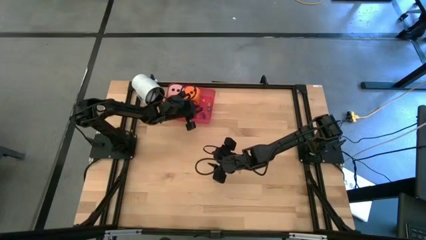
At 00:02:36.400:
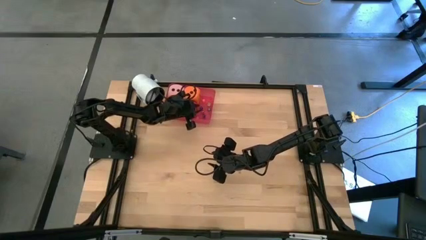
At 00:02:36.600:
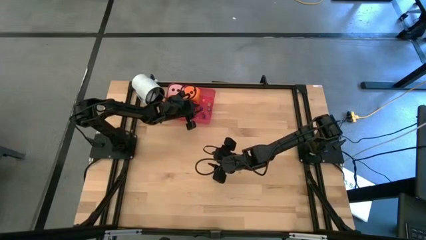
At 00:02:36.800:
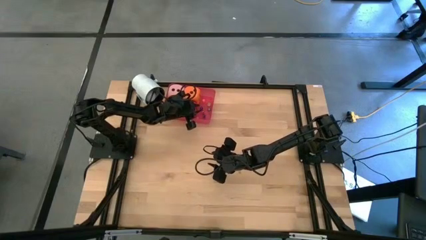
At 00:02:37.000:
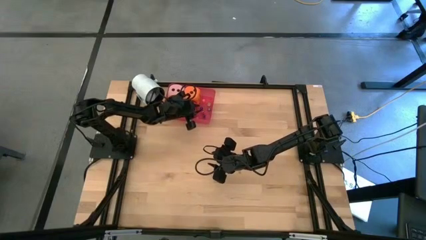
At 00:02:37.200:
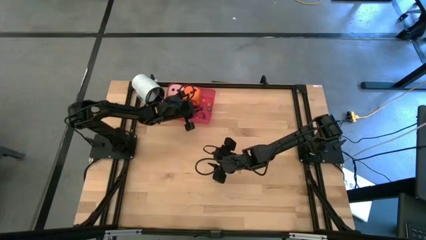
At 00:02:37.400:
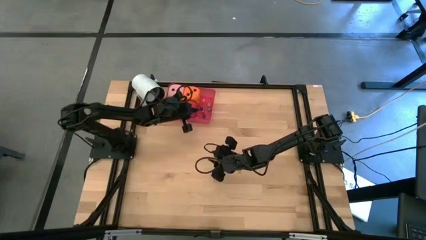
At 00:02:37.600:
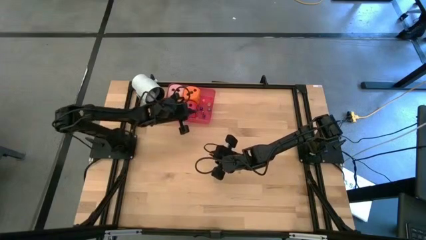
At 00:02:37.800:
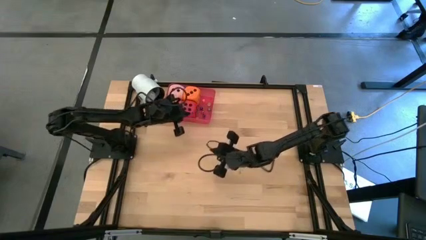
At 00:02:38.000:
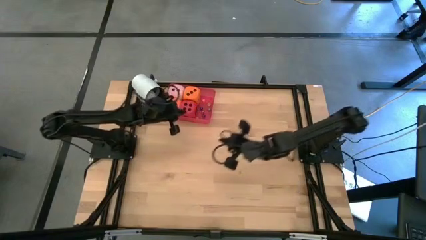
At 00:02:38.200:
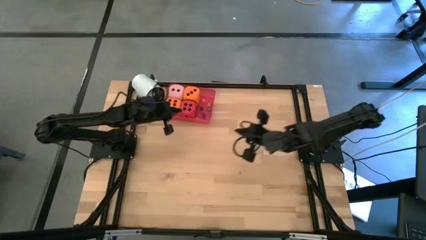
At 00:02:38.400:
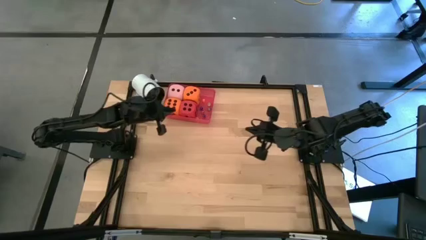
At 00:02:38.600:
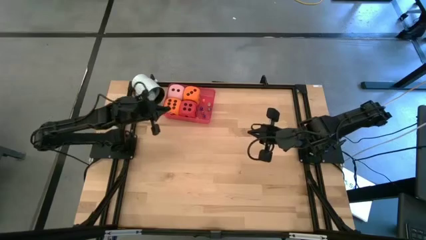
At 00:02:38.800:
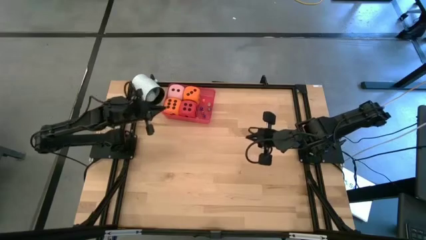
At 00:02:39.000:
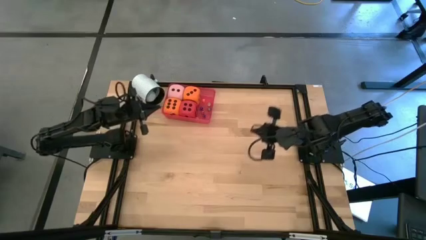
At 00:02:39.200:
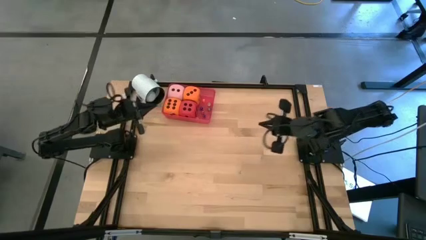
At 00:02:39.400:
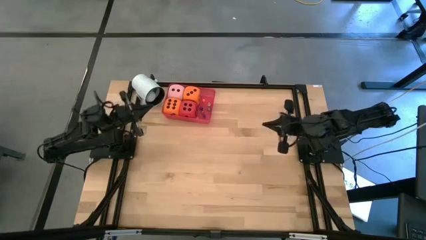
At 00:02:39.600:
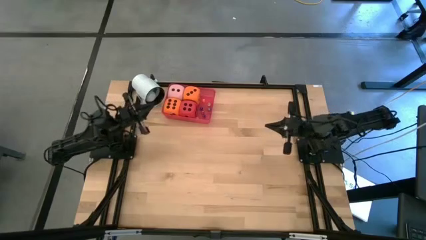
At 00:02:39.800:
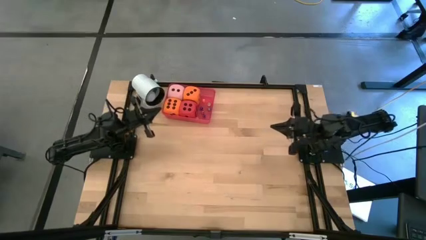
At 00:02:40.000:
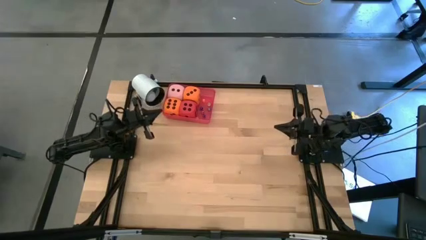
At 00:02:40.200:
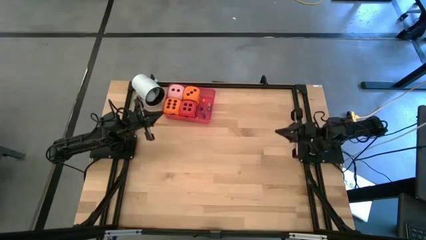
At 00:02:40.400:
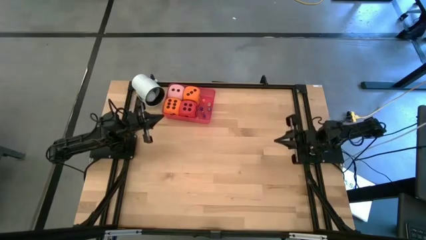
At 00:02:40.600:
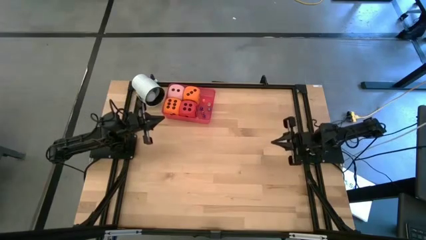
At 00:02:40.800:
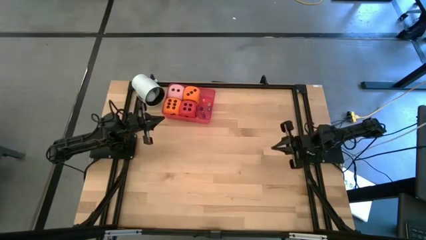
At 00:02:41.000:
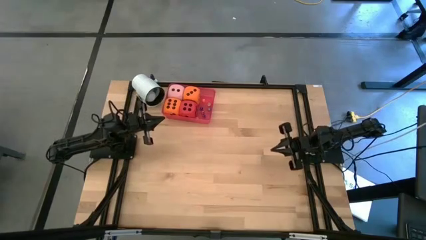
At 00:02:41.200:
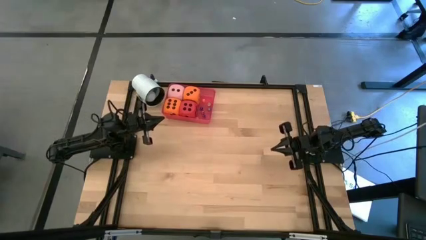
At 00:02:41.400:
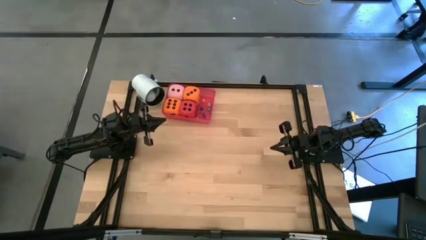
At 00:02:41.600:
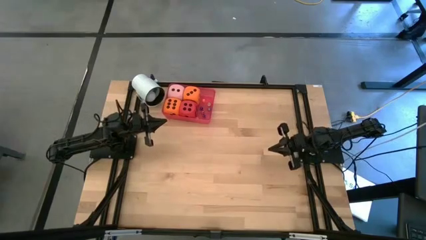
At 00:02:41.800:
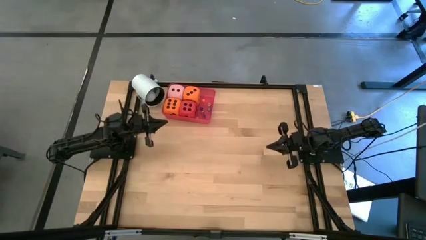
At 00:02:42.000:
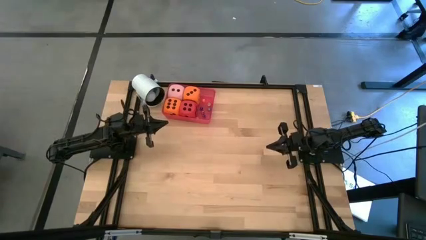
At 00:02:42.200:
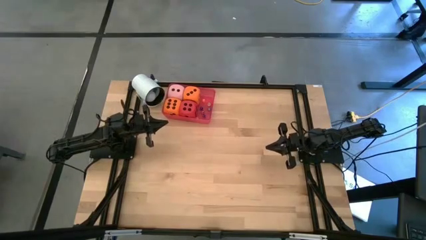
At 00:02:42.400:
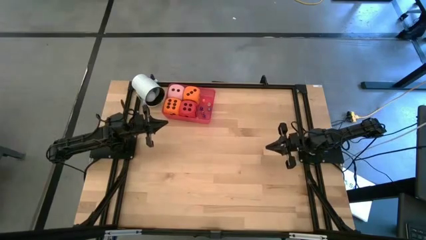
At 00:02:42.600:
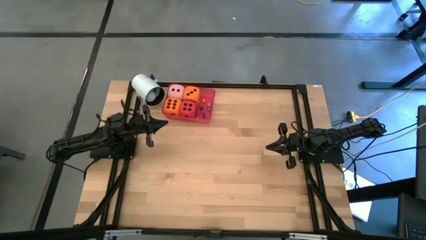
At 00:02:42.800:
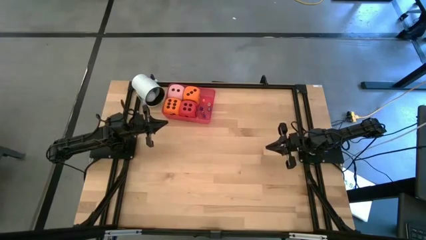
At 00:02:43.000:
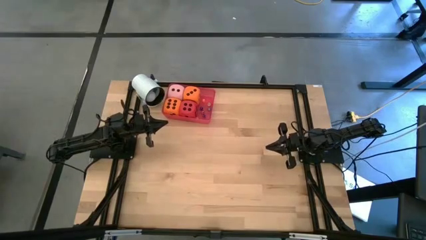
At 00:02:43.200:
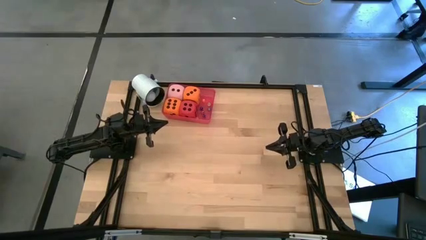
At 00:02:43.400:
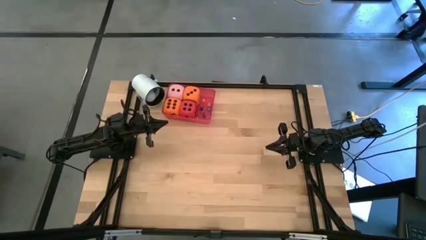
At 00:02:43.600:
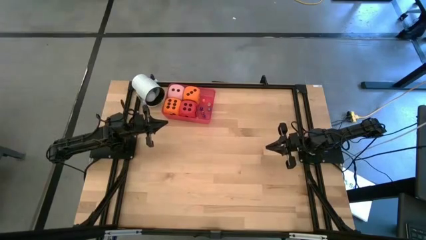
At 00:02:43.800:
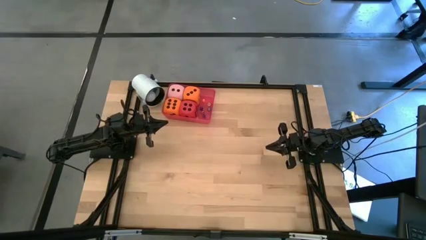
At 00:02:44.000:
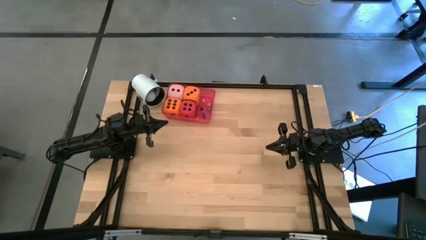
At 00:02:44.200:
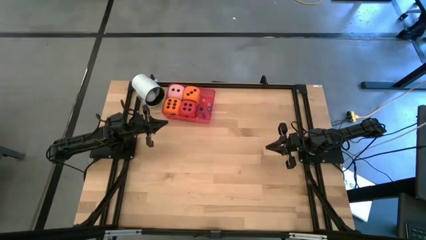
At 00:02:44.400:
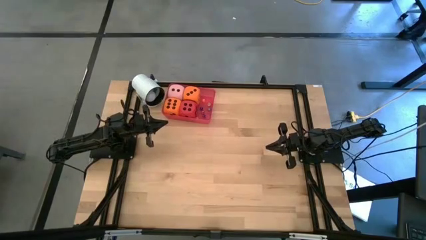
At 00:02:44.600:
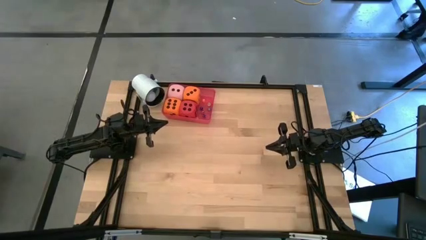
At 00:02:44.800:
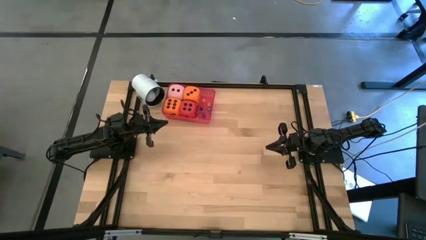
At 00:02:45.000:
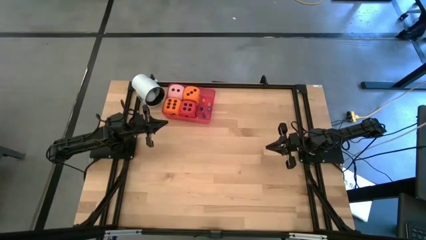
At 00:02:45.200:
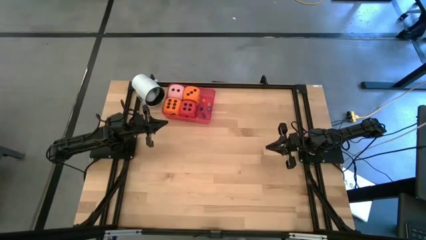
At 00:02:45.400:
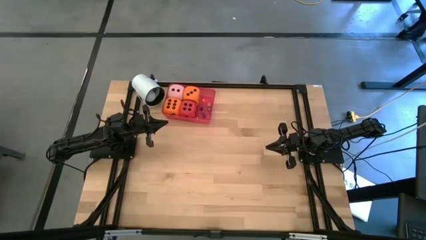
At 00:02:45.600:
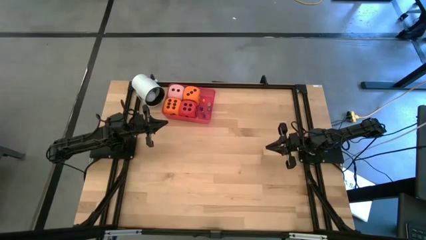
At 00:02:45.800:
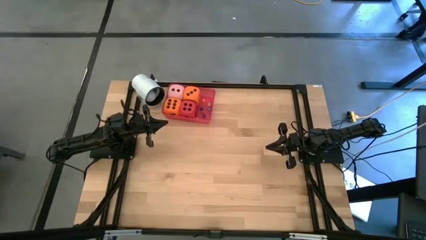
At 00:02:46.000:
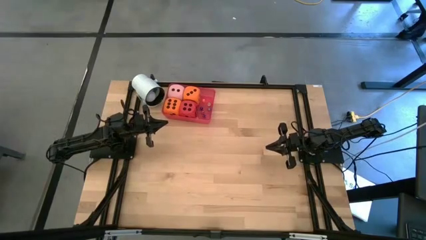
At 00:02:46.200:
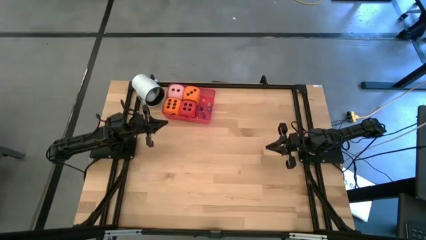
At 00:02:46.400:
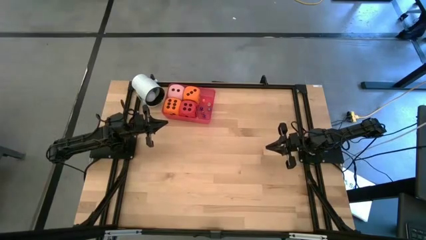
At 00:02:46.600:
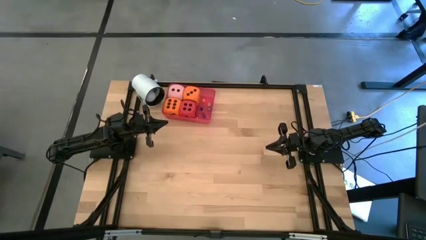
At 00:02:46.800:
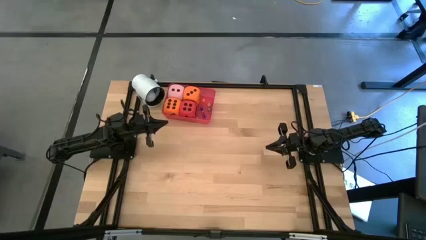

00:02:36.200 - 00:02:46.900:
Task: Pick & Place Dice
Return to Home Position
